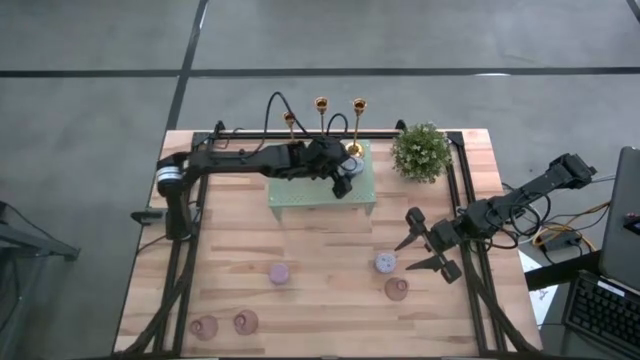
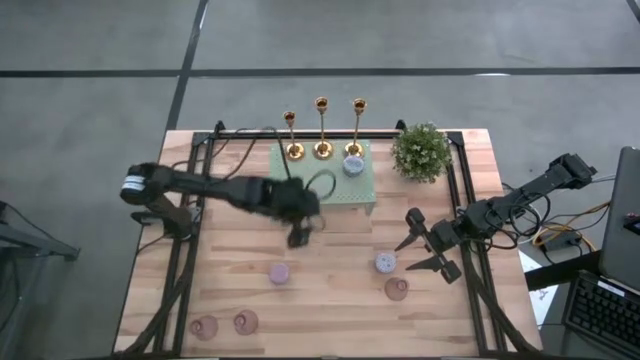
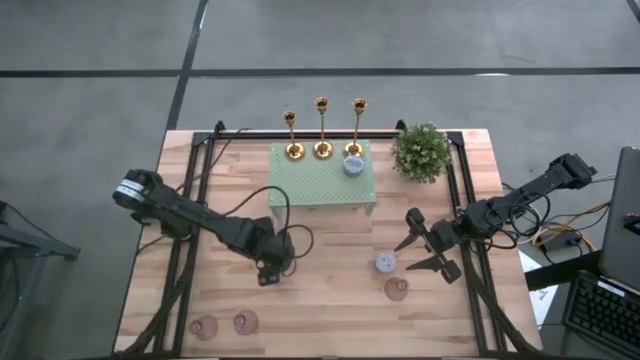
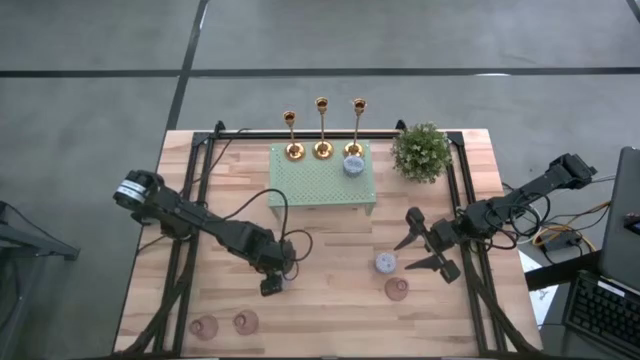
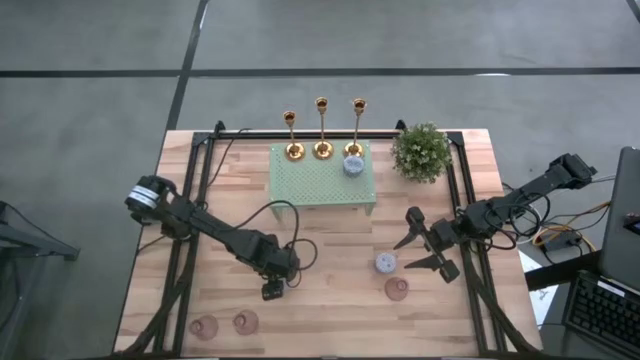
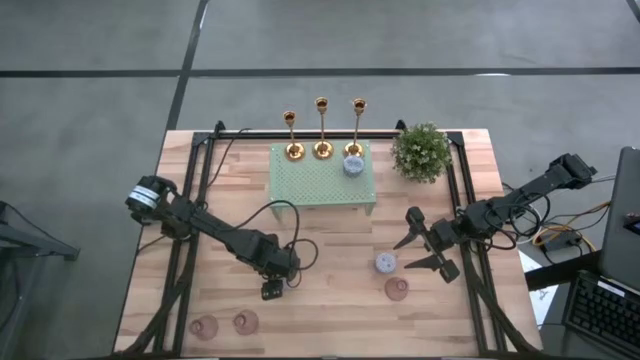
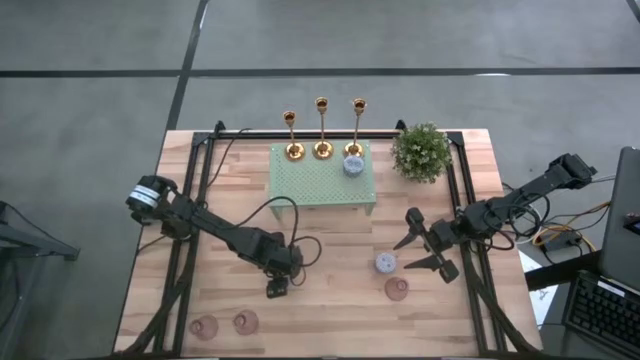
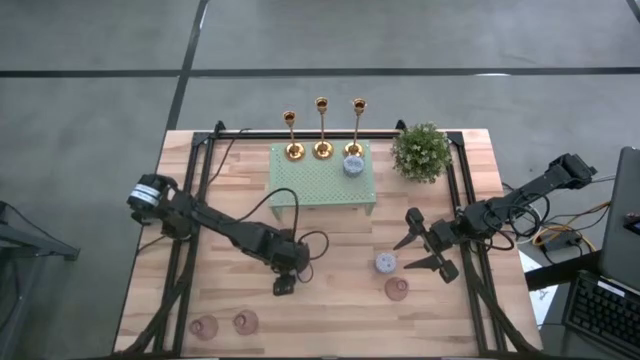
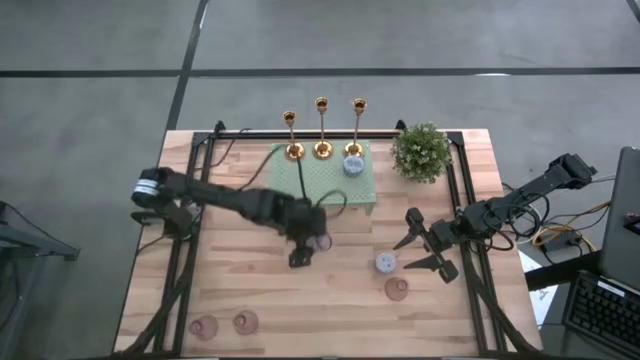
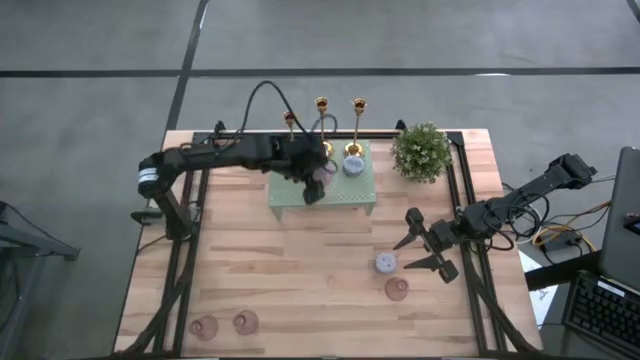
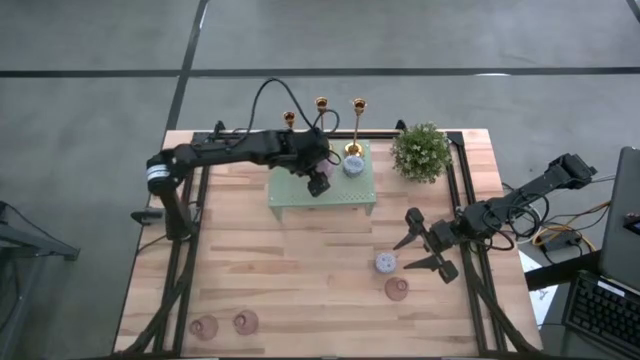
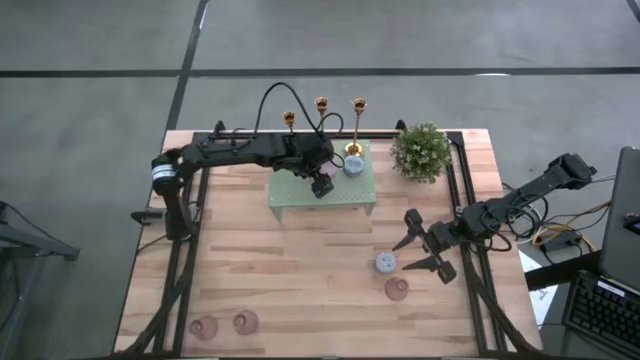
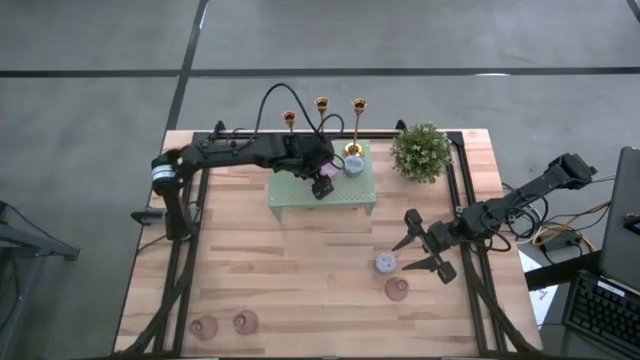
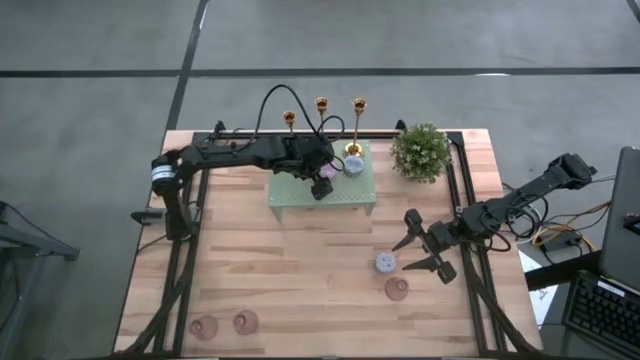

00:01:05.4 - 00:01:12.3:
Task: Pick & Place candle stick holders
Put the pink scented candle on the shelf

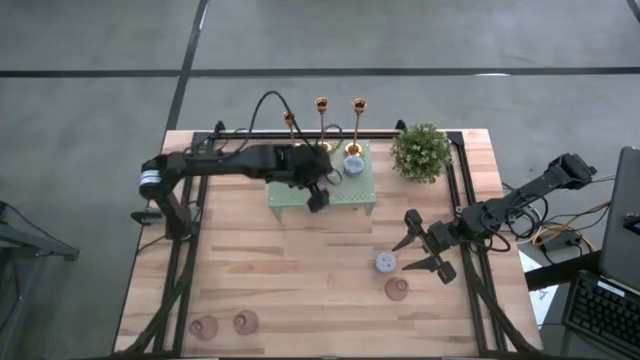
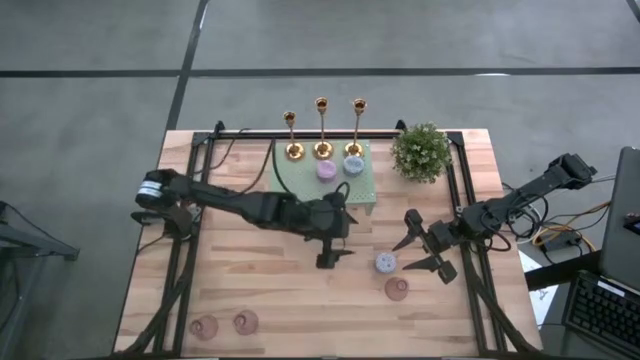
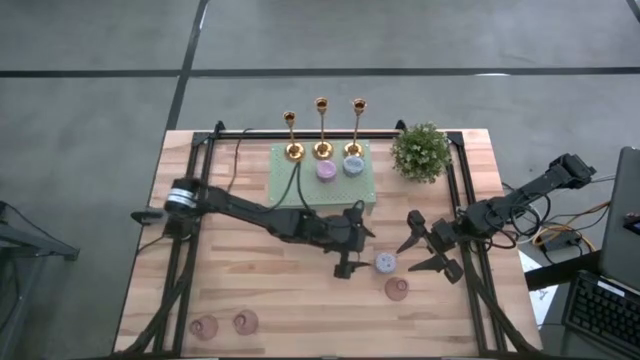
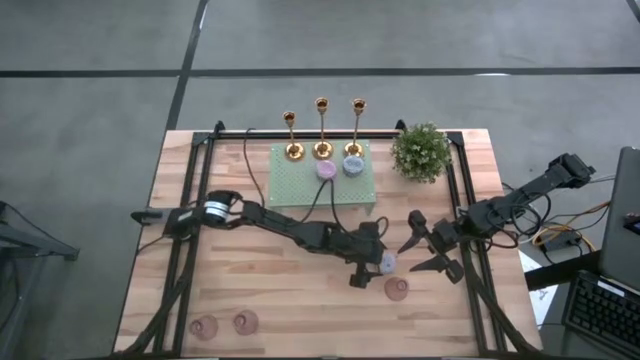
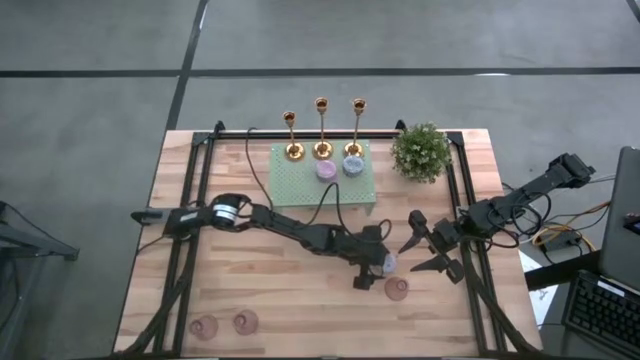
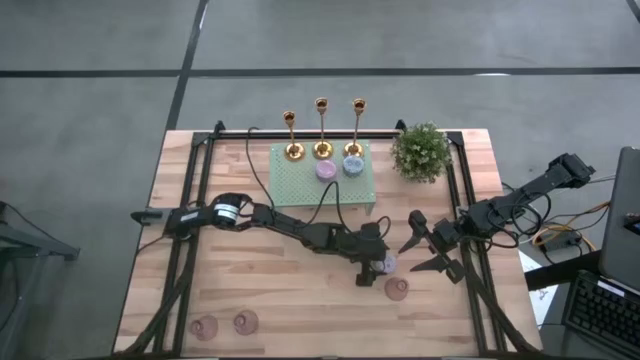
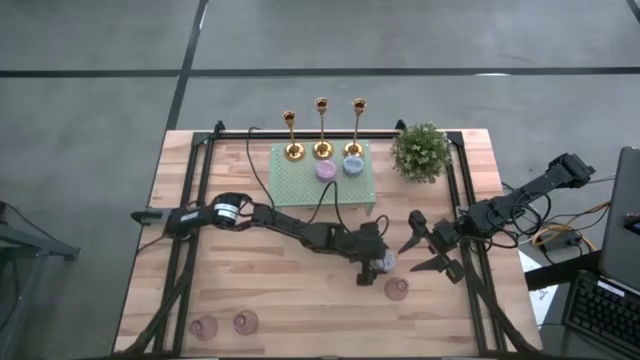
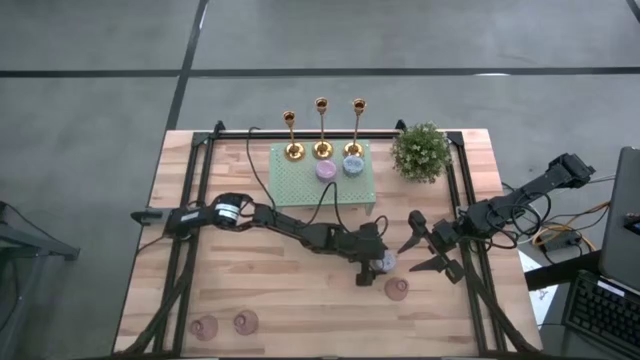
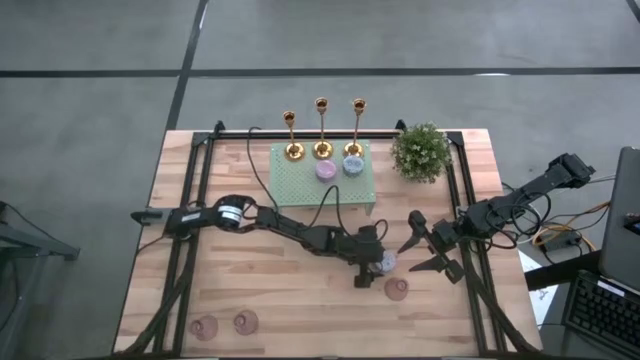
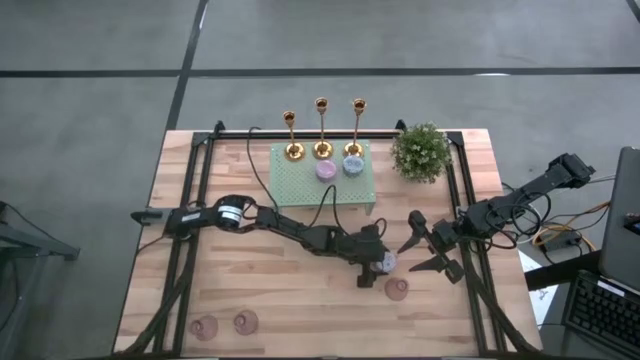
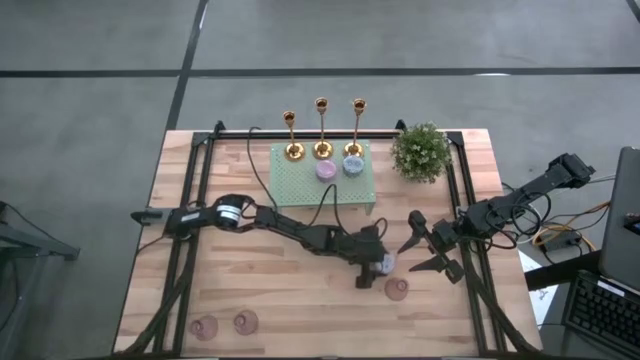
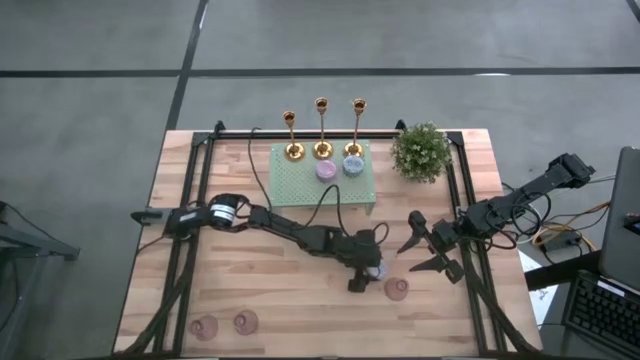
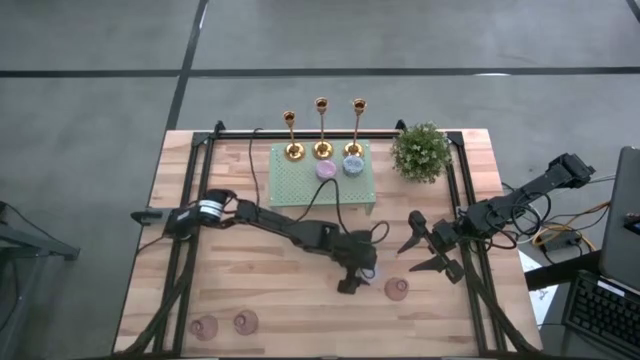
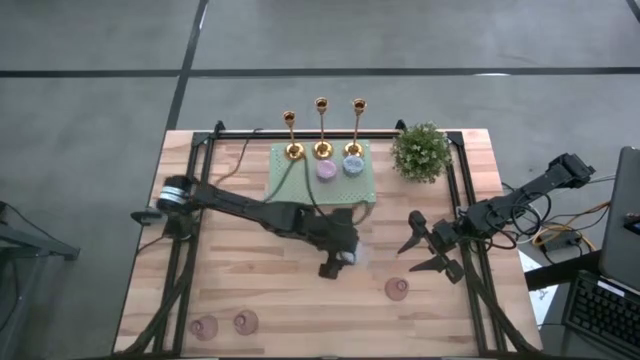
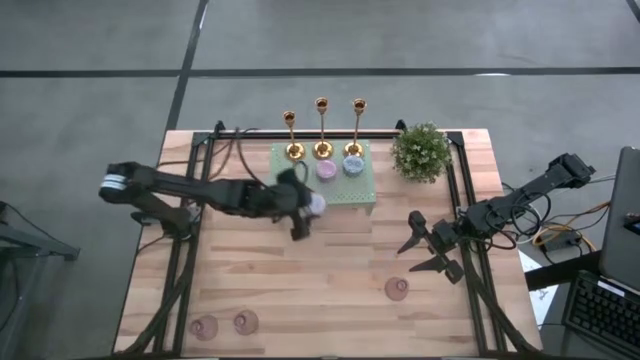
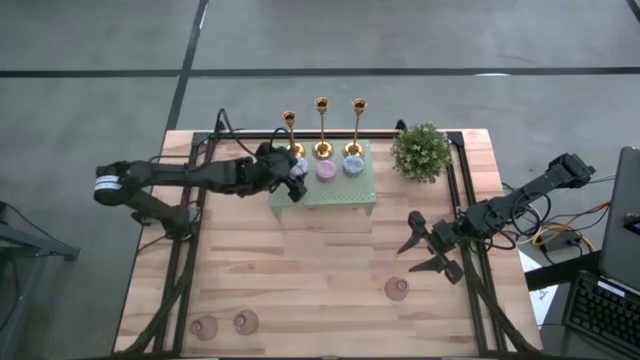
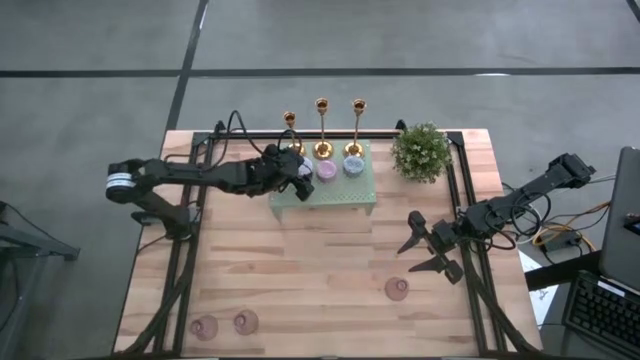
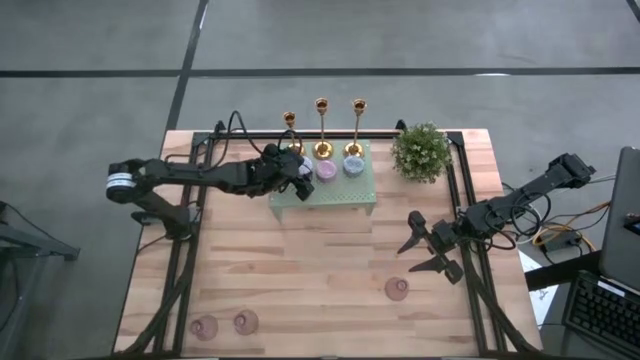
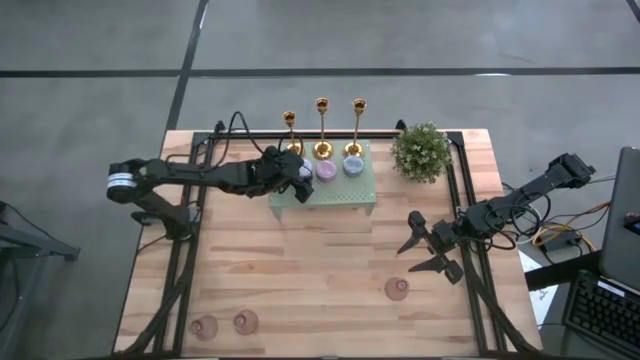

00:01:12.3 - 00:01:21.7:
Put the red scented candle on the shelf

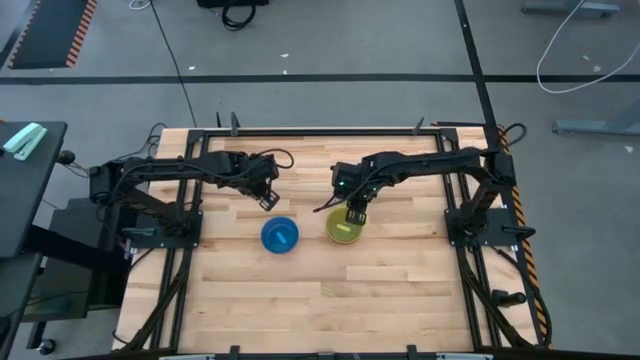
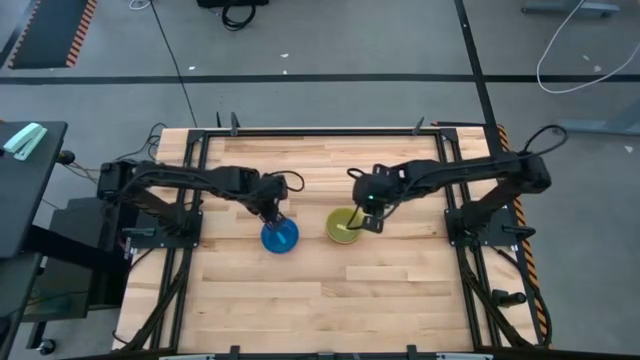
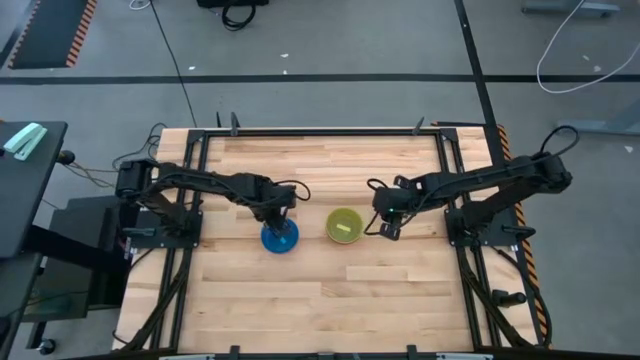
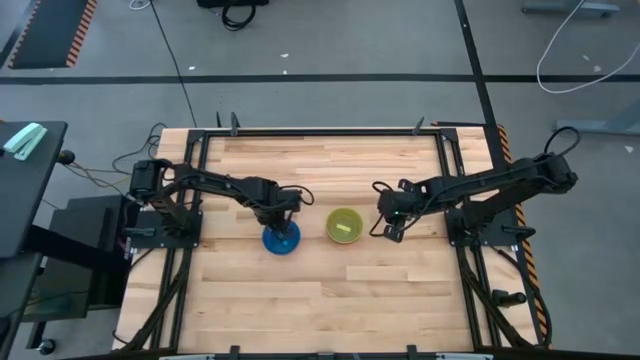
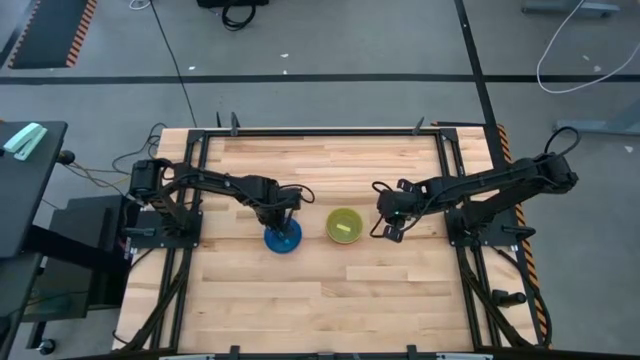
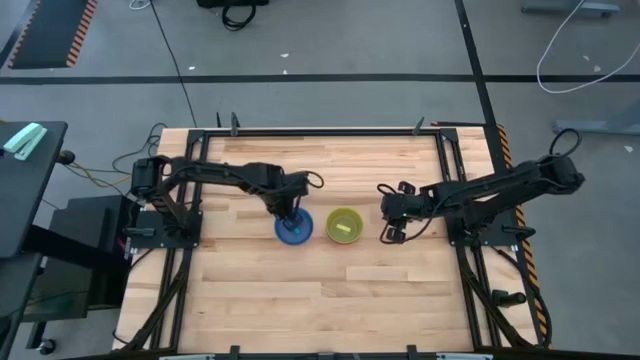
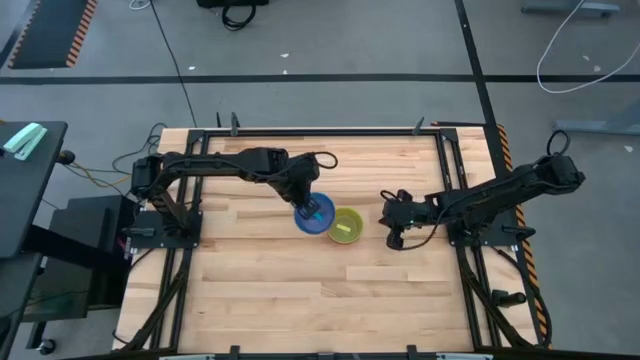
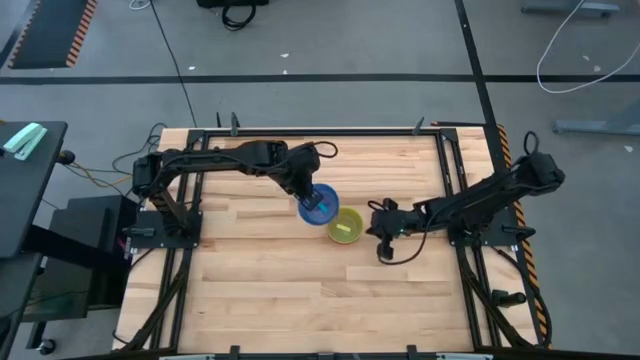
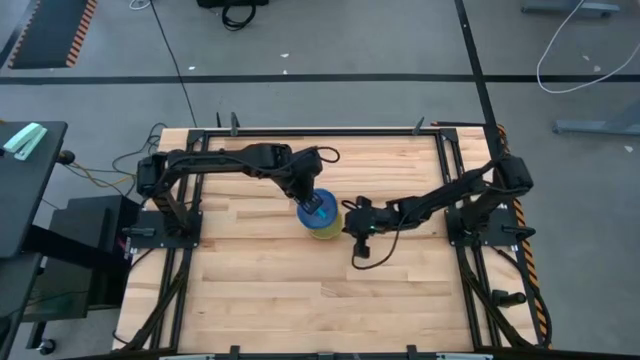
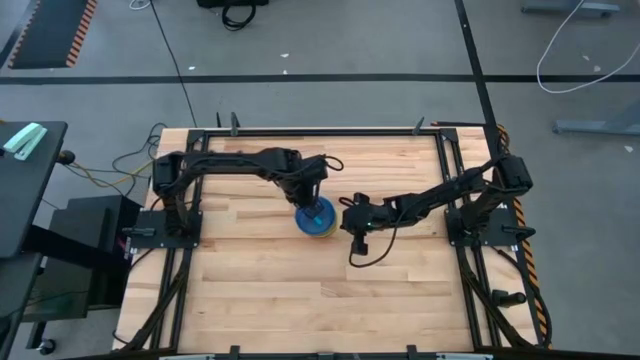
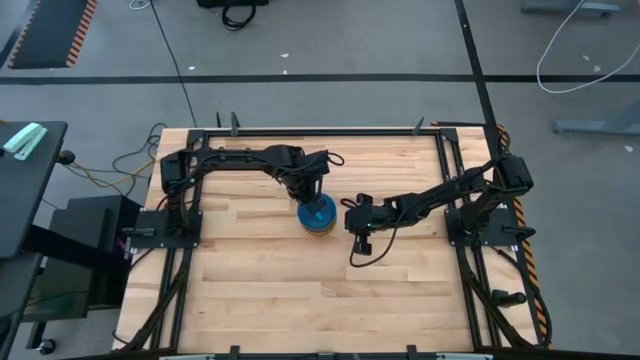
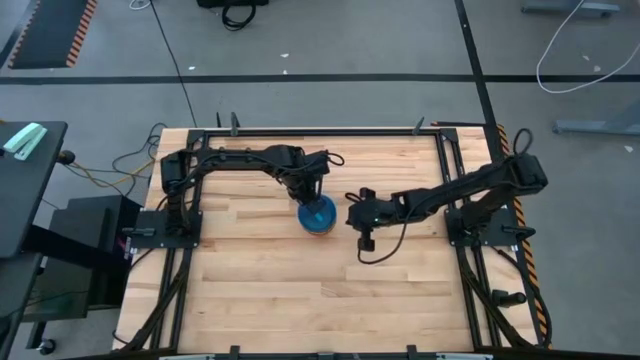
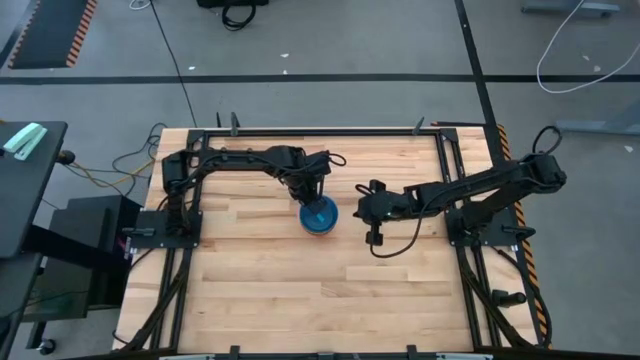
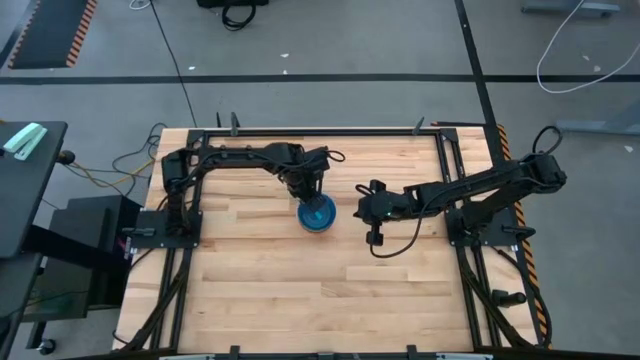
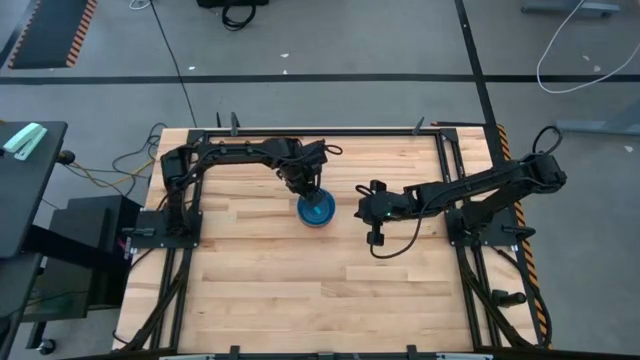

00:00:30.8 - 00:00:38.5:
Task: Nest bowls inside each other
Stack the left stacked bowls on the right stacked bowls
